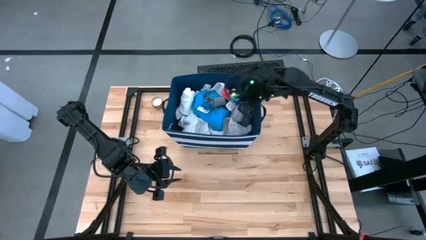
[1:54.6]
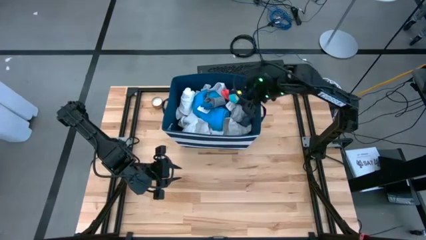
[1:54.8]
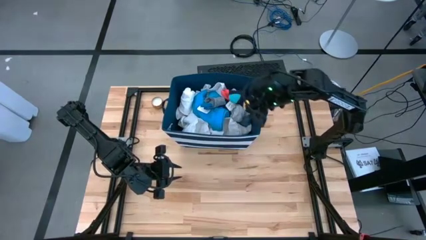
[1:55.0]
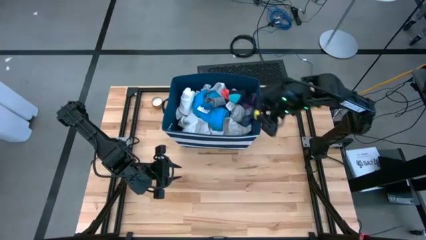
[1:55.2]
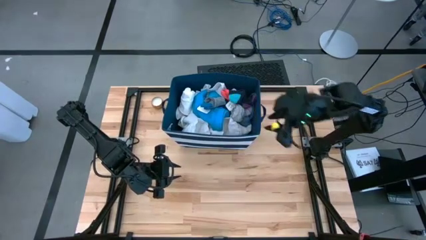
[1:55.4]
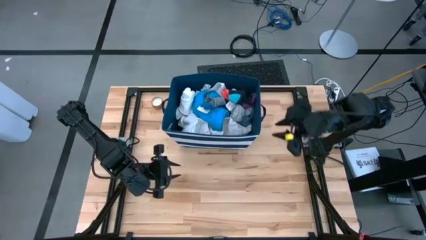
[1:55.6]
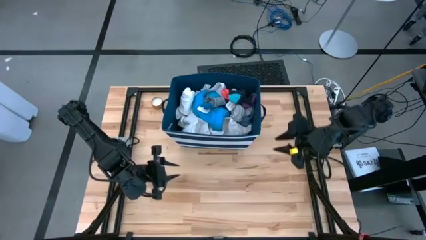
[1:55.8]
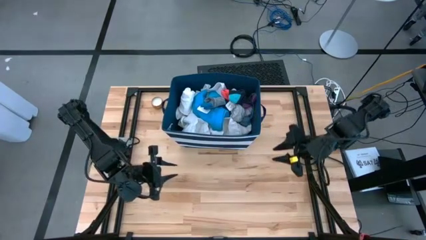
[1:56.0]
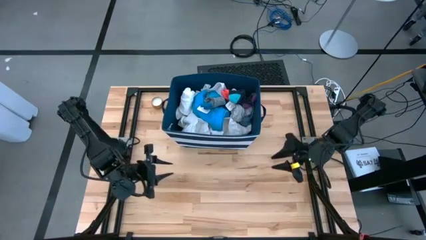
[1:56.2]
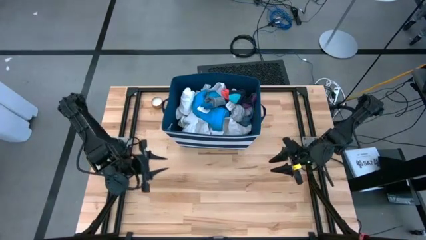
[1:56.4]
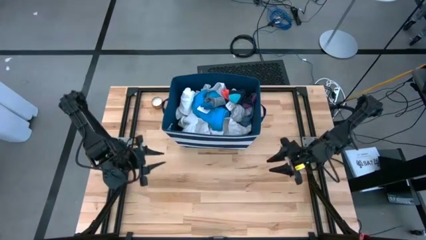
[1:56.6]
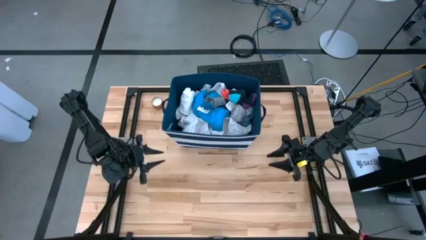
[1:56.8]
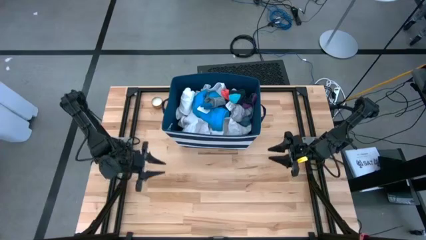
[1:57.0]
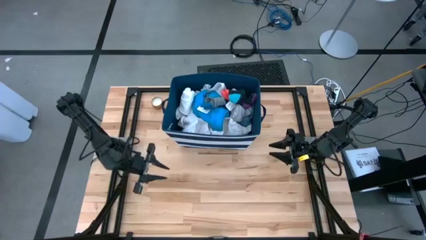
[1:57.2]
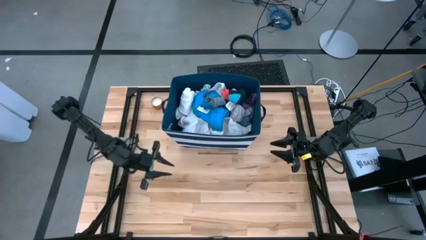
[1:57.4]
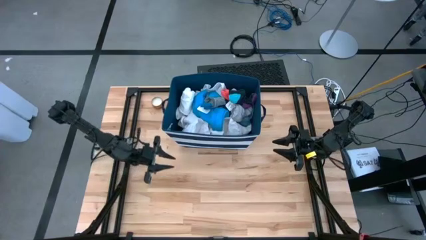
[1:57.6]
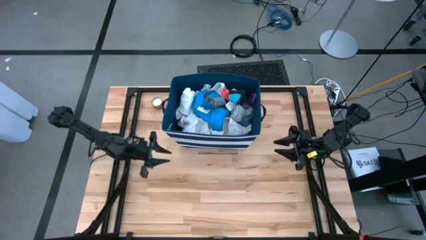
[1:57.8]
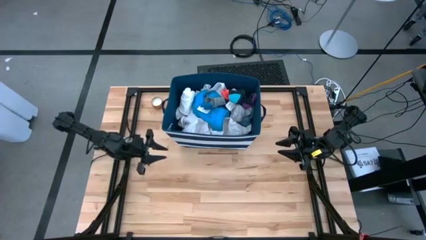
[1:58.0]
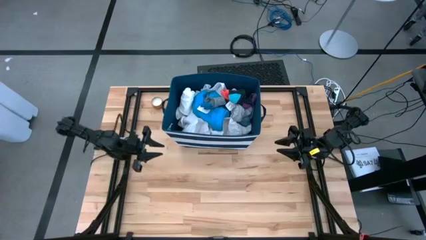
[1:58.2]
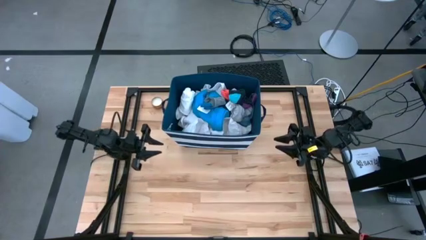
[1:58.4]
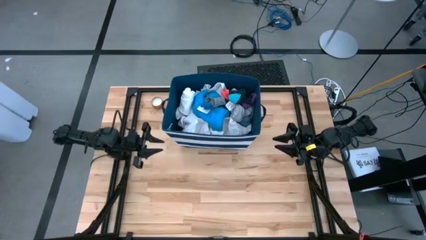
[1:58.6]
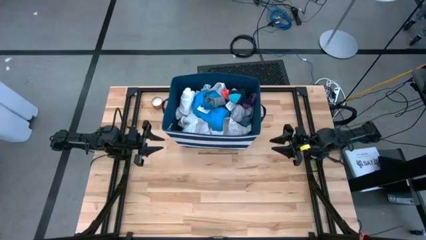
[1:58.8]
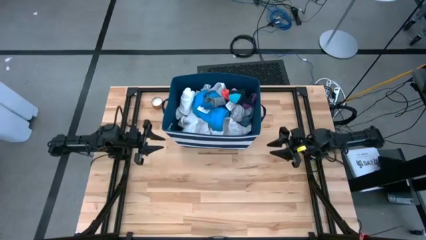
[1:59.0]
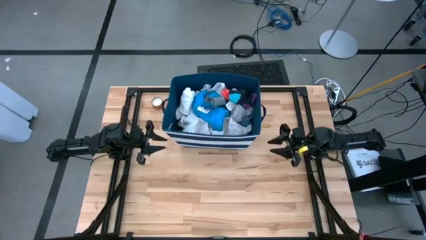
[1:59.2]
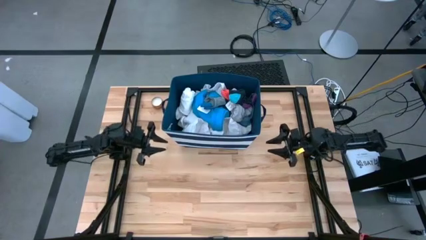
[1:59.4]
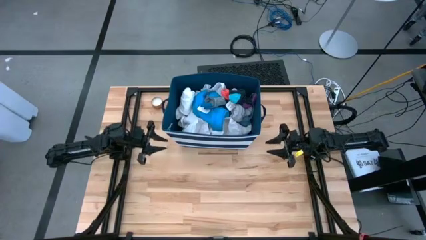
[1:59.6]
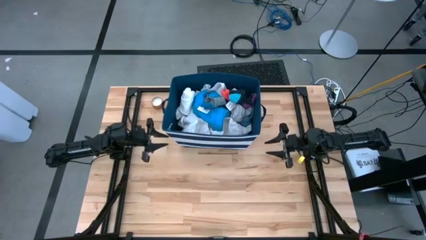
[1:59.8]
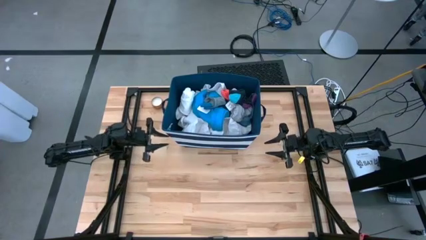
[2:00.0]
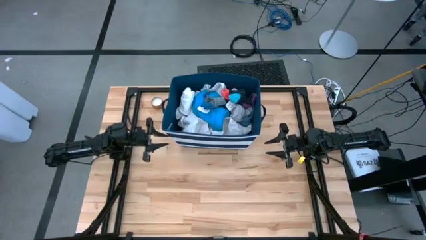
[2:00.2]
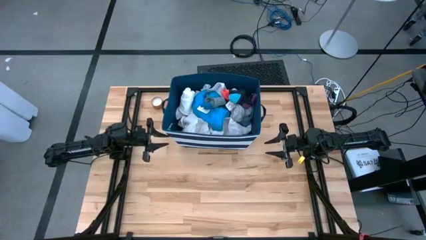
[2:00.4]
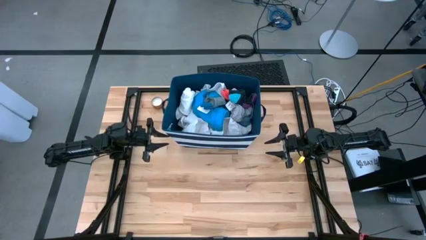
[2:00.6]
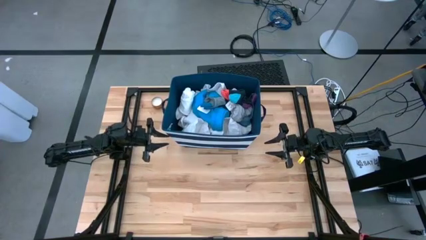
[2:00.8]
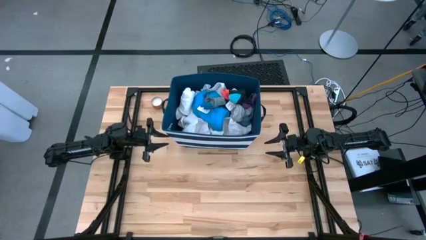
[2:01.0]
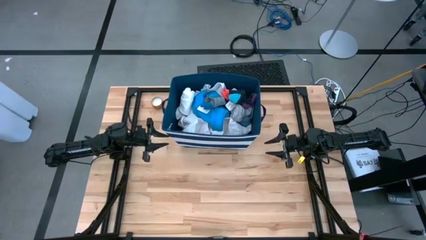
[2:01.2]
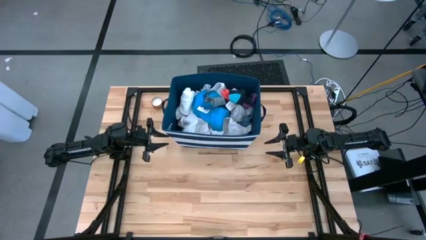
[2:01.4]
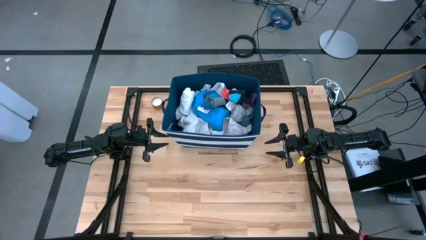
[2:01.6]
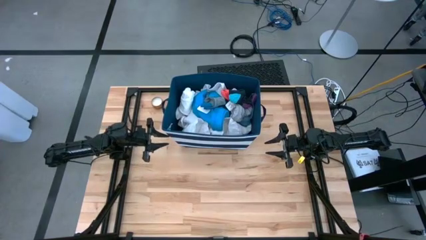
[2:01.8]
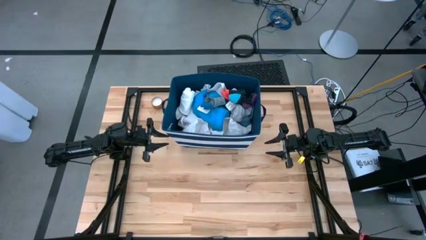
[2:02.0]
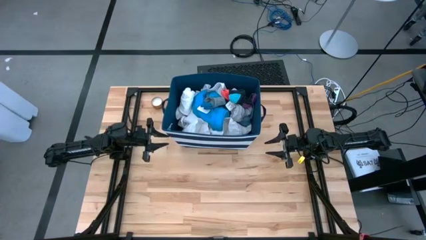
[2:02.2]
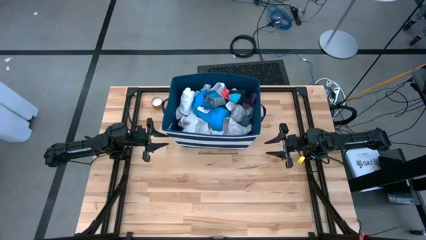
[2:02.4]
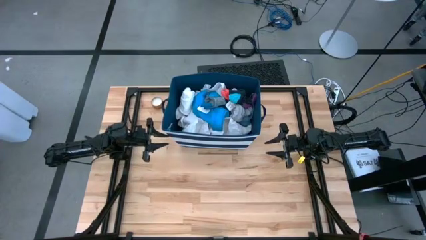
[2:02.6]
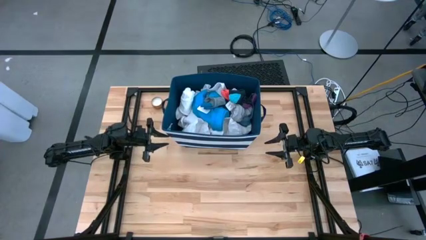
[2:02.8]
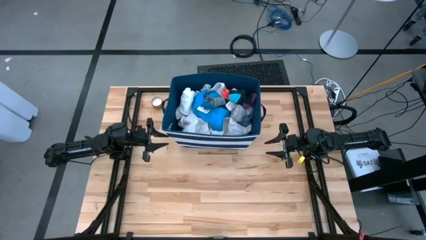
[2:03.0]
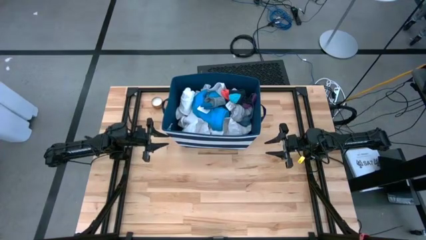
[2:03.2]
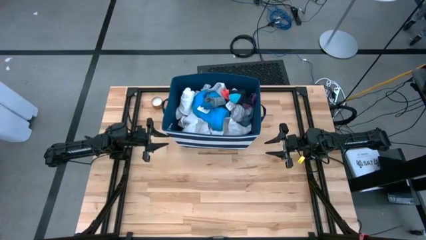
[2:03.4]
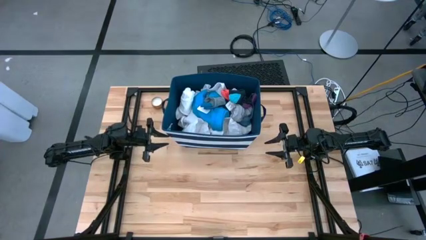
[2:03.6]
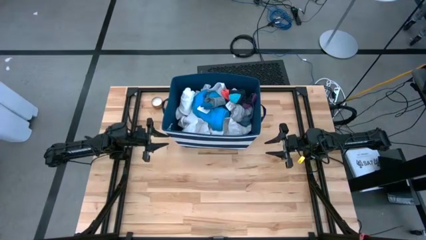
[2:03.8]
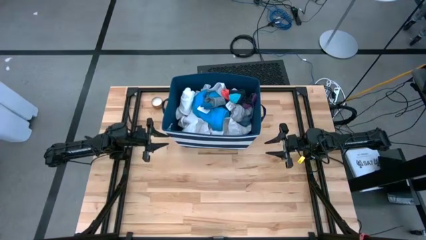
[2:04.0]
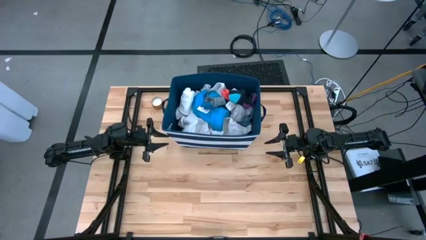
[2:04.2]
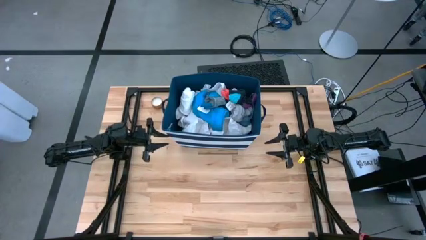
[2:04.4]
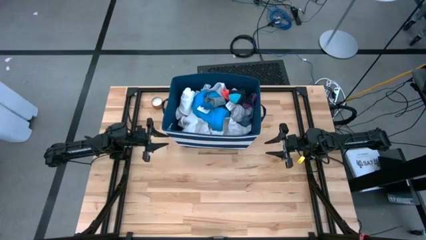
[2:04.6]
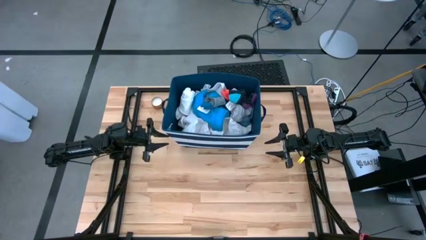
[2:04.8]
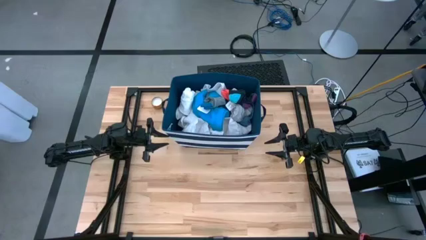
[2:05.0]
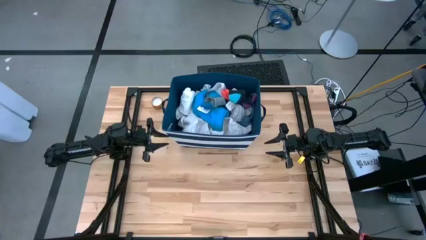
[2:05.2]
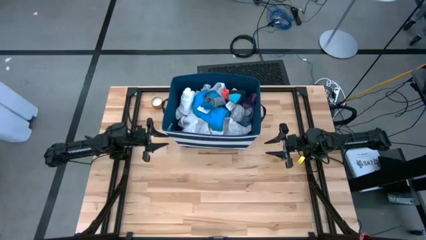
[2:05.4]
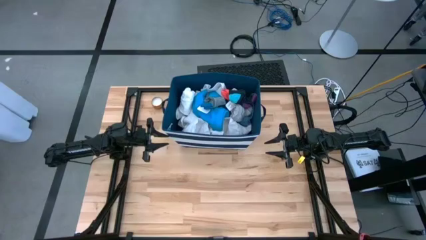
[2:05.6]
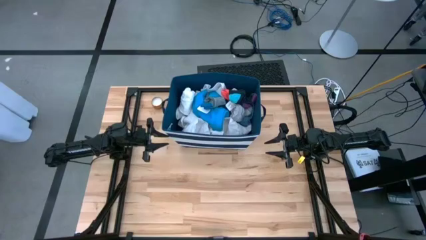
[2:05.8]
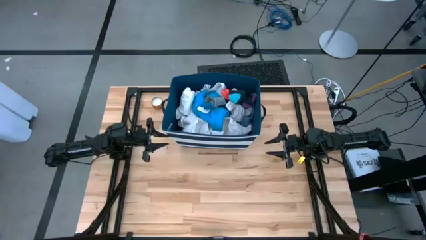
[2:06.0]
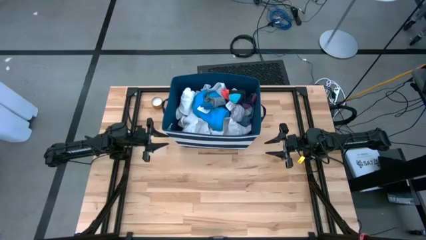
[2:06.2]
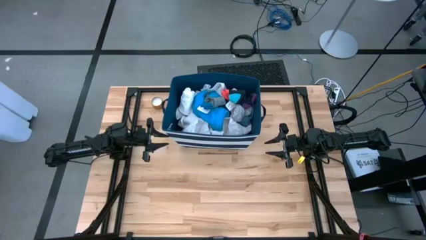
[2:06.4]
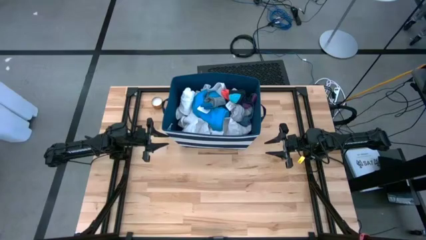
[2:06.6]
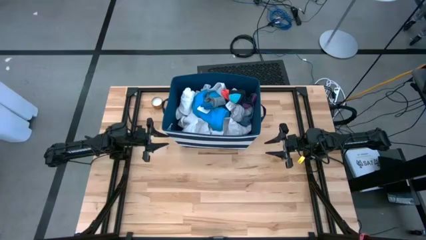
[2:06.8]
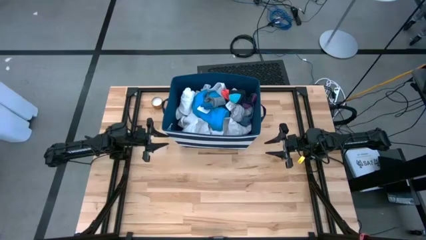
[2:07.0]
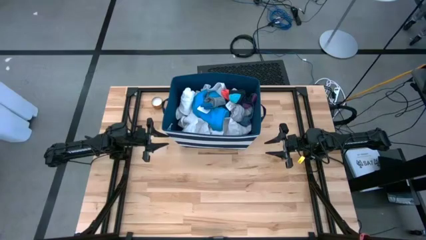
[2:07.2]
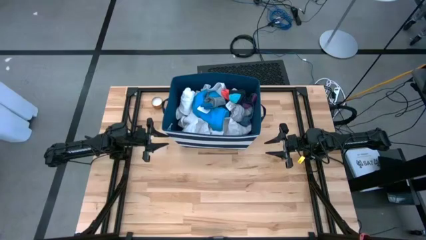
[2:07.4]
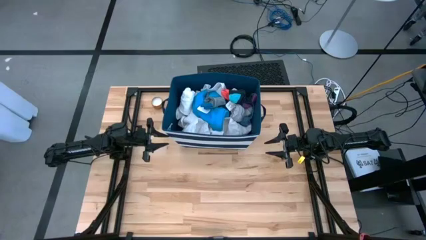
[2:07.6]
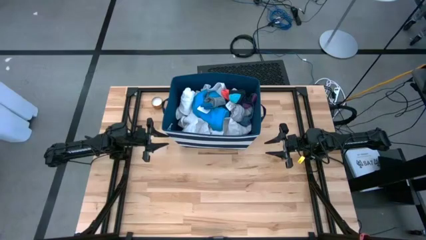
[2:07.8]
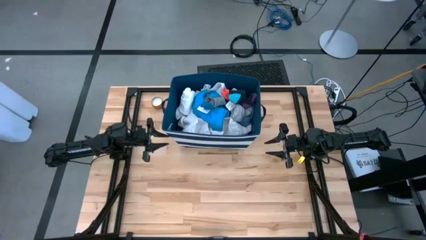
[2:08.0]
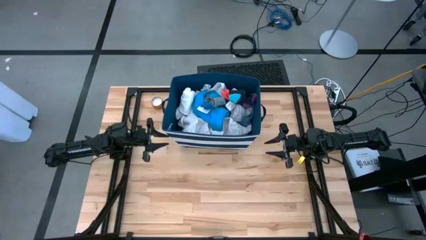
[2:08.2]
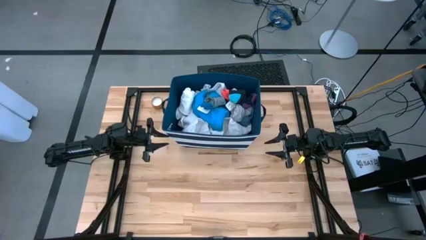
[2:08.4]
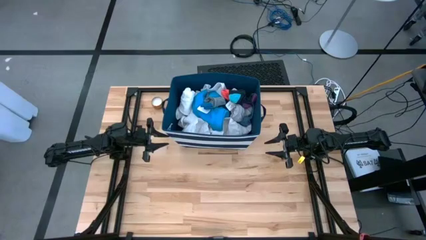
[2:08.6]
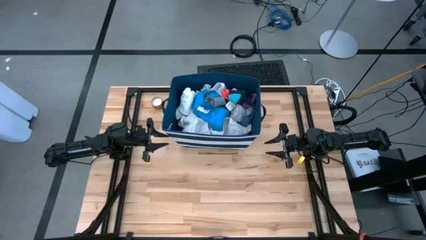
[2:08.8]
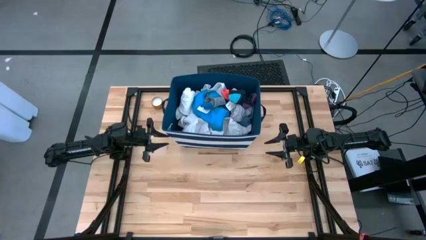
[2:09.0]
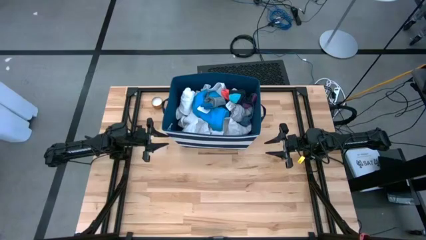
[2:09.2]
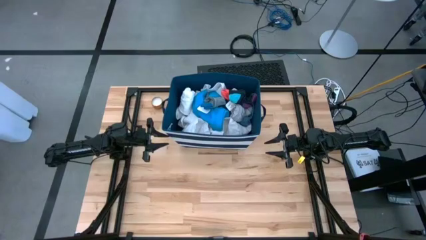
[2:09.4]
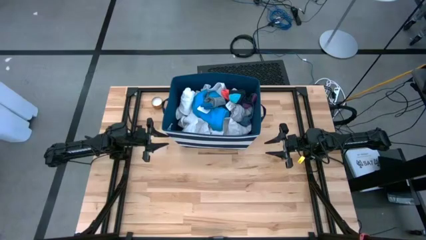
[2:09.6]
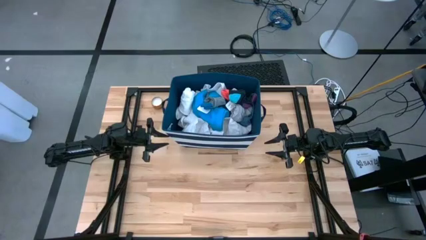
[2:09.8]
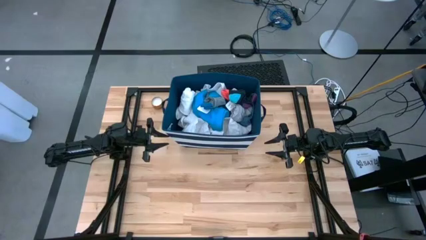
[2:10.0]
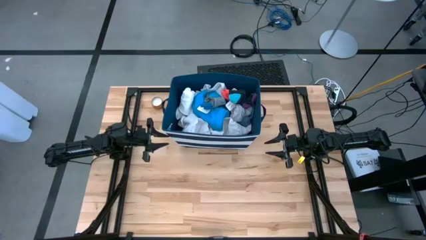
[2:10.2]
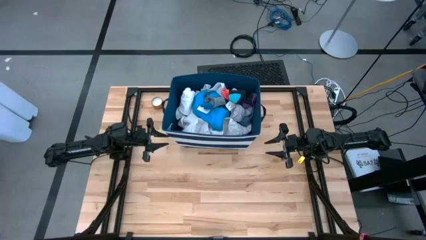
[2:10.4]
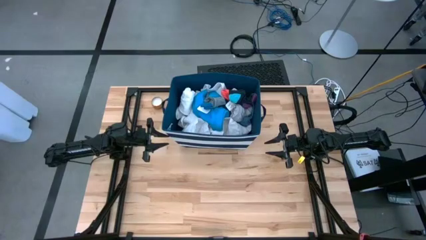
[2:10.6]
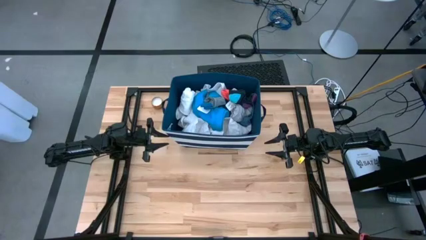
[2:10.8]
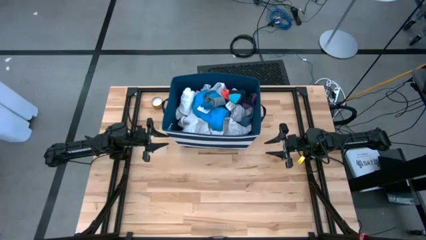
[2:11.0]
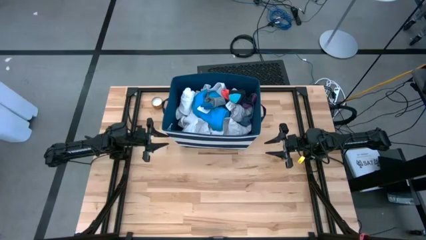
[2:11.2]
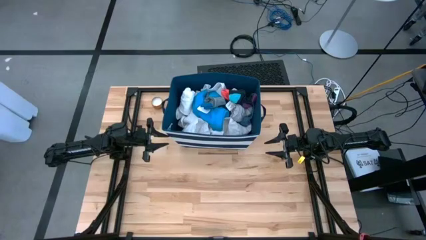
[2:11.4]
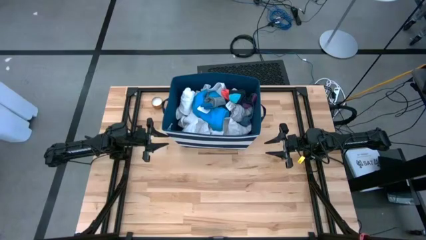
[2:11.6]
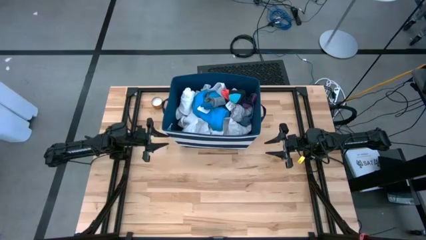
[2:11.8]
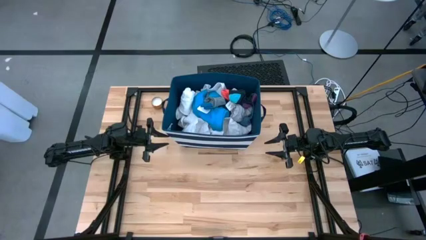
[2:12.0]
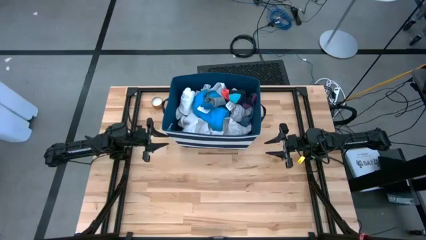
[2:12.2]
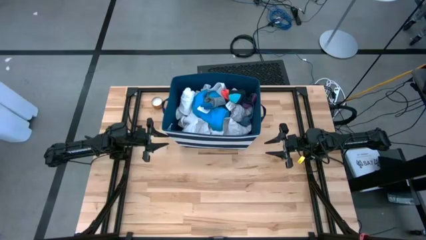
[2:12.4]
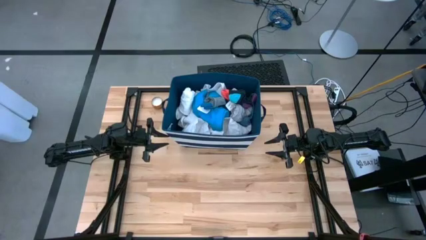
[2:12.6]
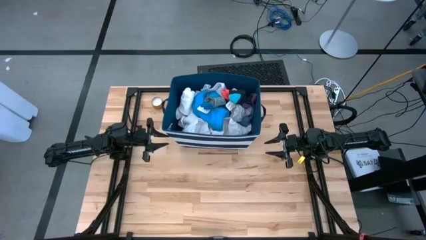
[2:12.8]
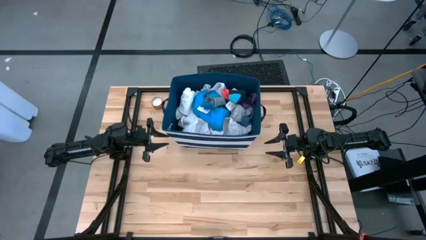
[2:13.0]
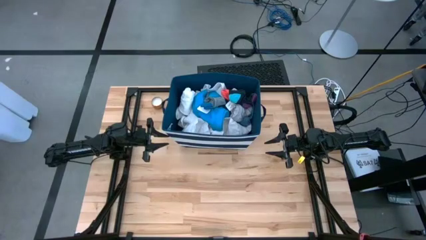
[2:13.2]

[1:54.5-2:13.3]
Task: Sort clothes
Return to Home Position
